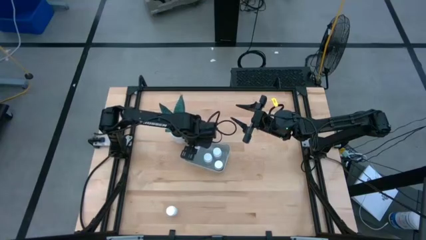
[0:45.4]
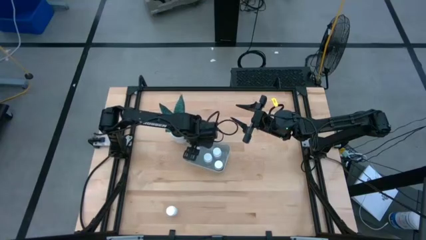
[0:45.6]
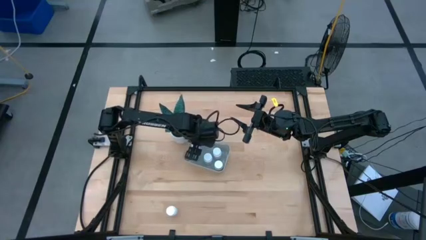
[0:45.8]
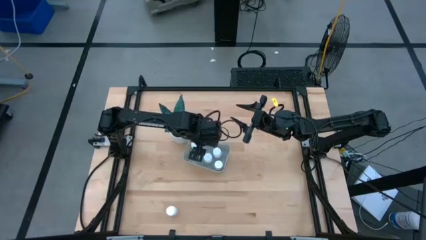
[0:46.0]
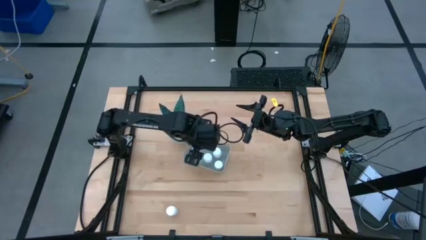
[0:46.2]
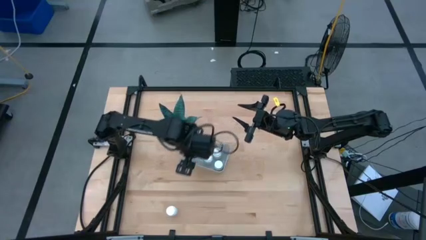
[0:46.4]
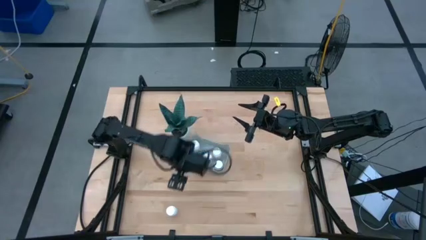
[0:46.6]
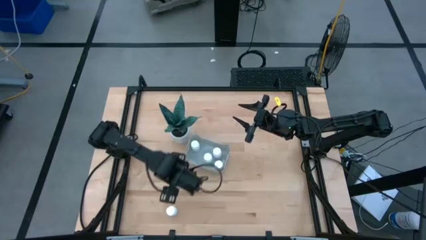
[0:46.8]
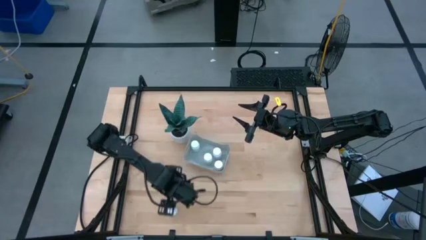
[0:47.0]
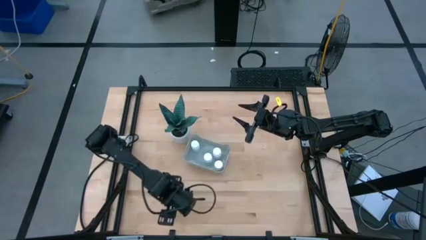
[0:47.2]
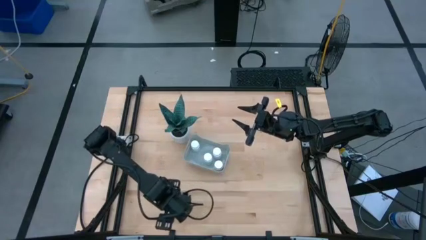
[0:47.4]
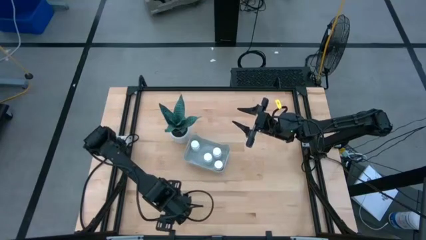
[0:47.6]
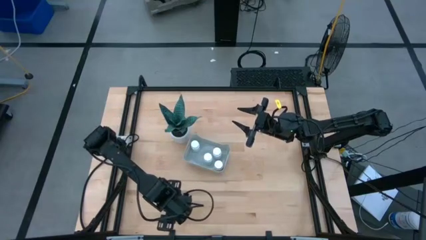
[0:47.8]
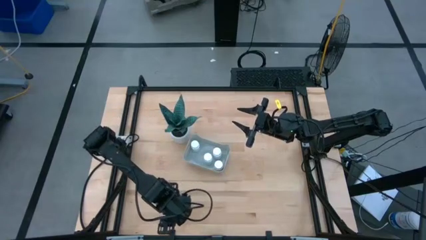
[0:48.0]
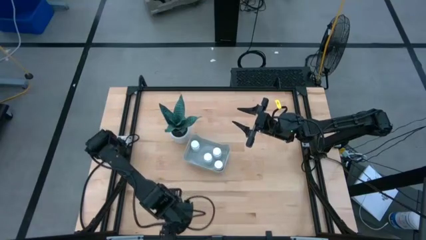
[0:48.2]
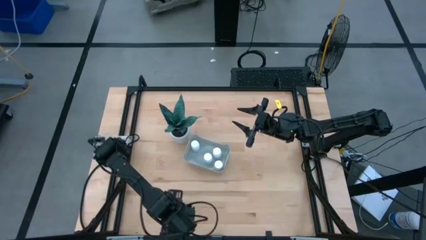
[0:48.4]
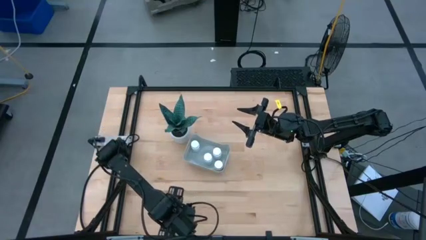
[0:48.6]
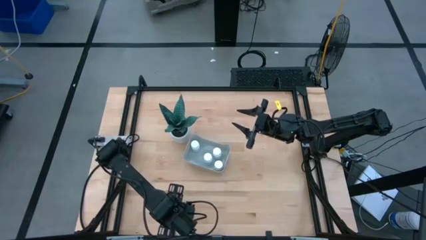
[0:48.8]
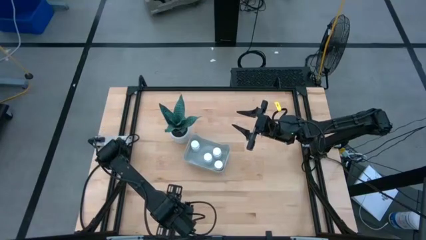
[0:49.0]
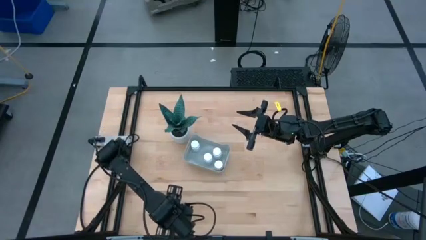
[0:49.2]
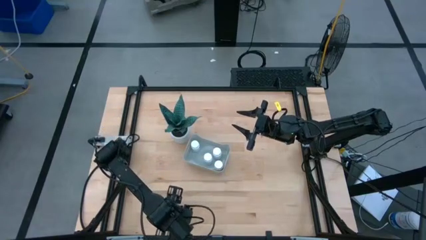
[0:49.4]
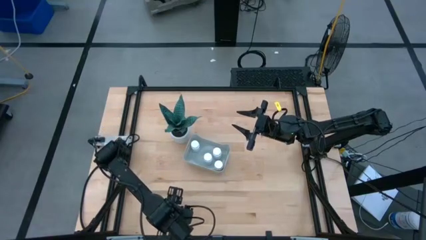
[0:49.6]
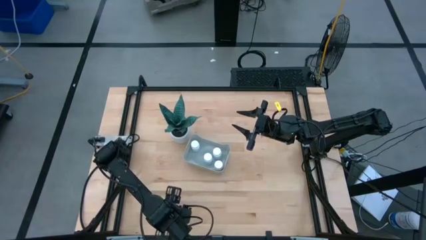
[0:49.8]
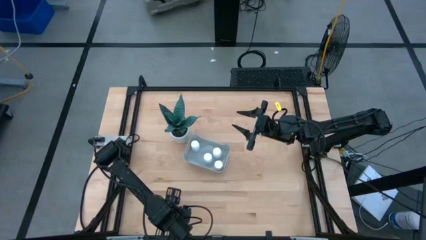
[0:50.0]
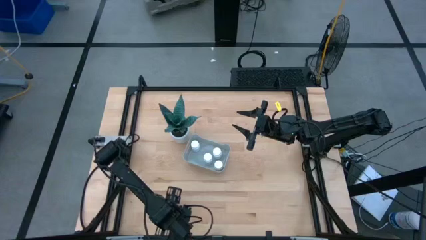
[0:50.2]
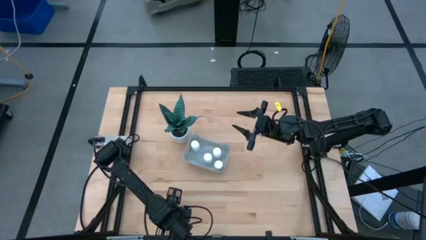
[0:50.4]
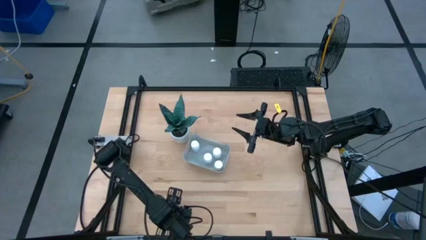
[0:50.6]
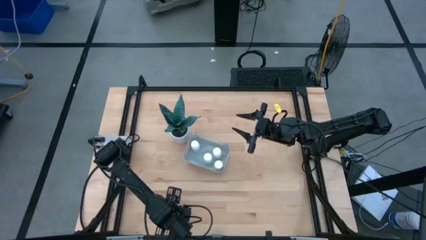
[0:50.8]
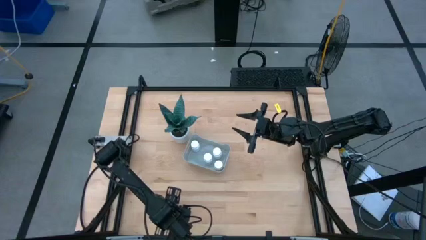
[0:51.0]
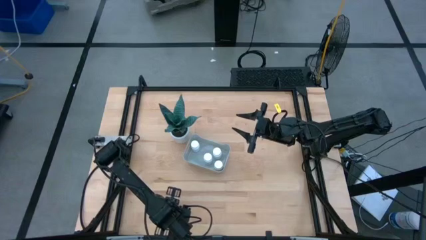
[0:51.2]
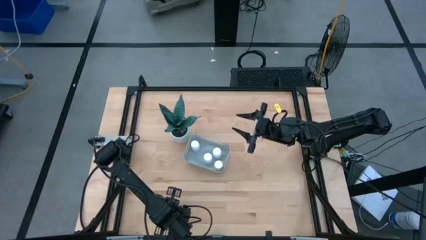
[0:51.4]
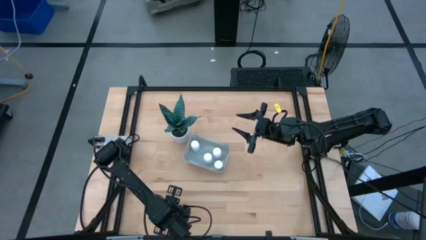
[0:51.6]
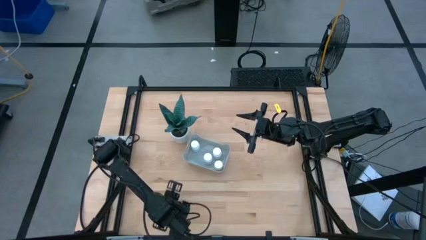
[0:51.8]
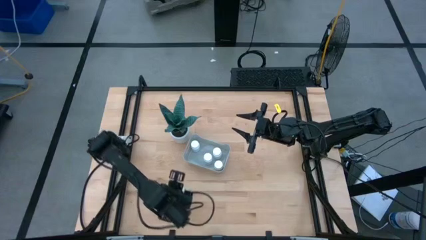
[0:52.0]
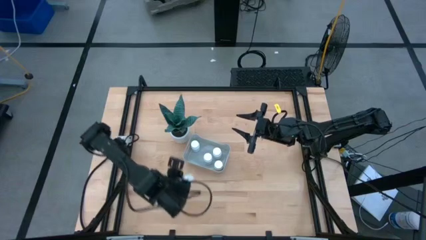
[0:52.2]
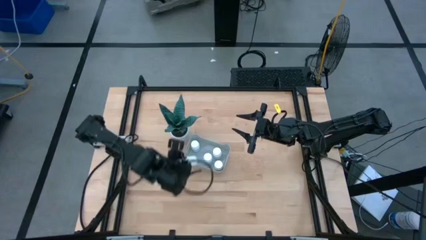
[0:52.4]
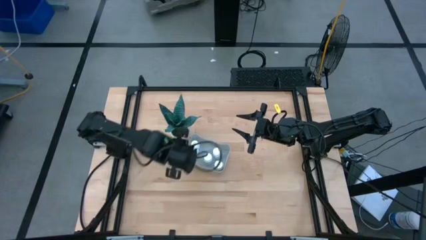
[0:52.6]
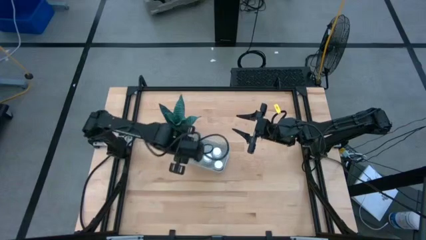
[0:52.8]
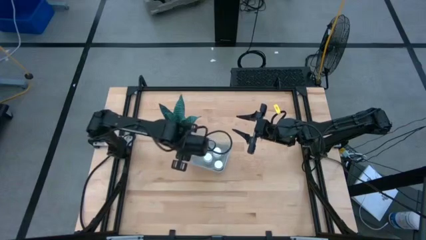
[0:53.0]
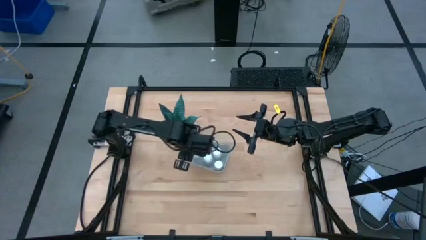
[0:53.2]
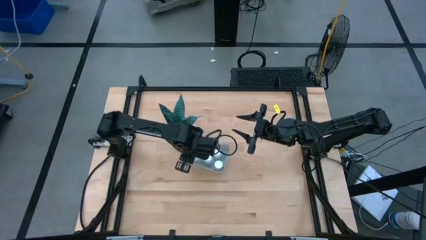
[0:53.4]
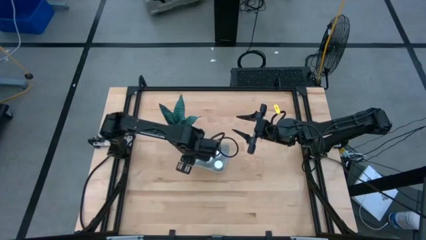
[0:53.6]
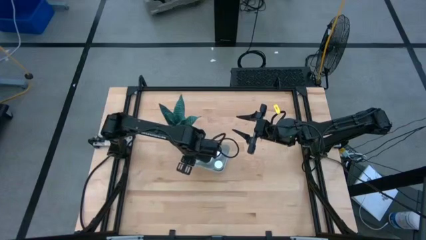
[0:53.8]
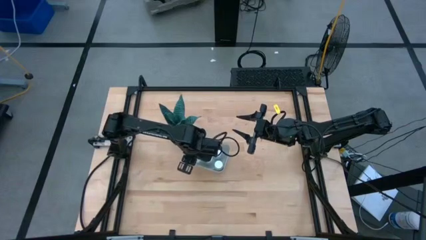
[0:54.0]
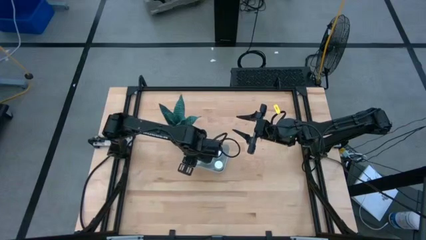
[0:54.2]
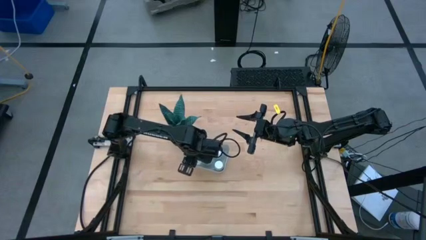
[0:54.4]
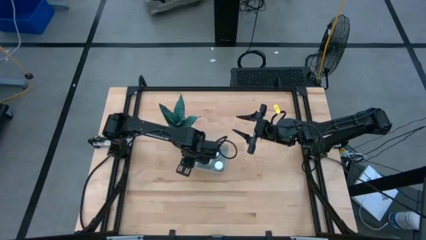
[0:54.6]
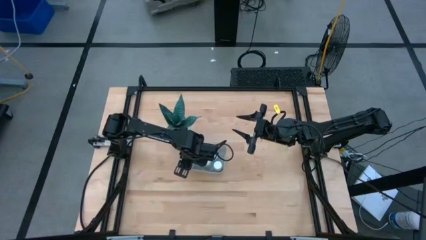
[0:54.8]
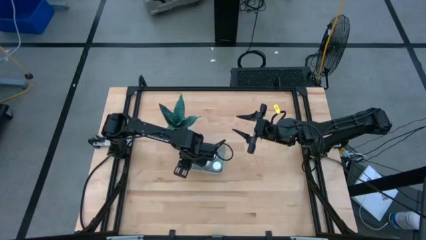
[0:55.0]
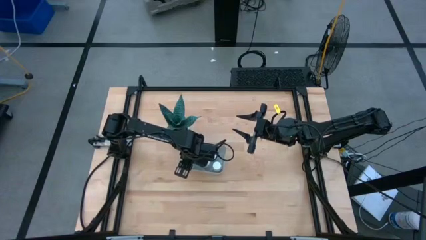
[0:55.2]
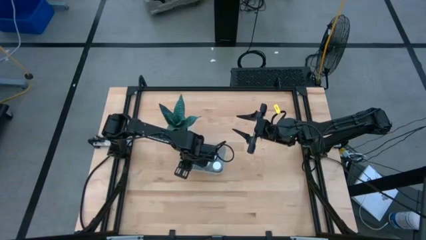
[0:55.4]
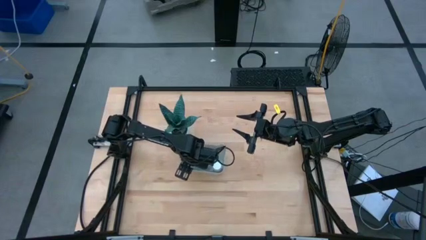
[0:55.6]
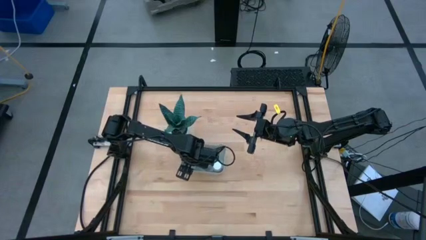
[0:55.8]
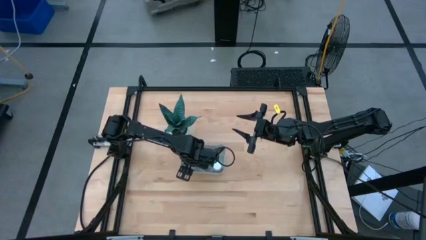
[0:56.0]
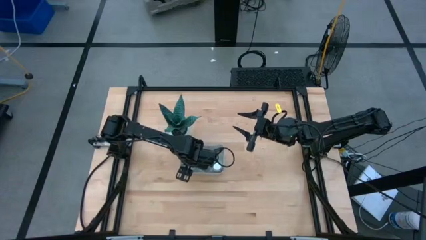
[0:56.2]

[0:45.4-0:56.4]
Task: Pick and place pill bottles into a basket
Put the white pill bottle into the gray bin
